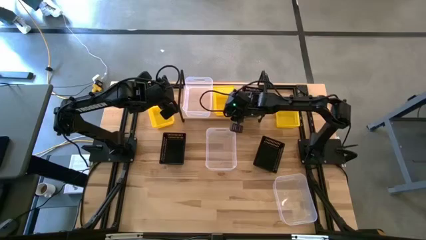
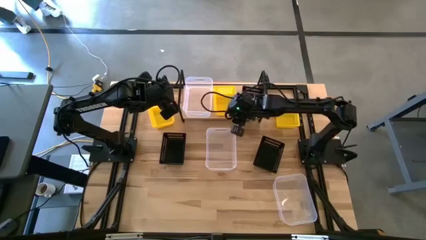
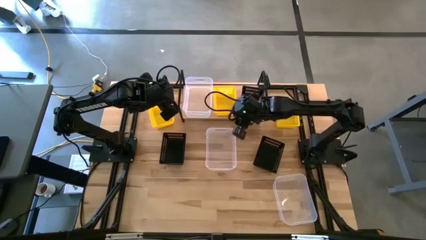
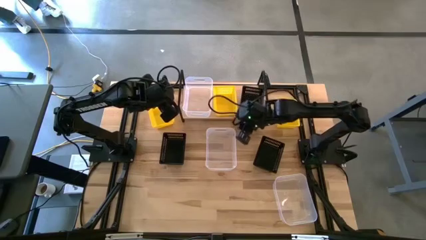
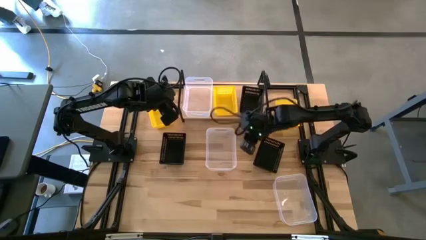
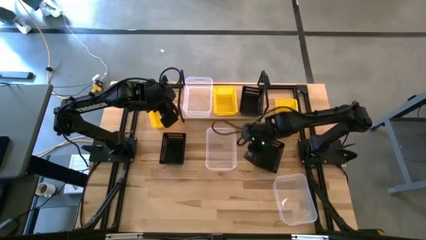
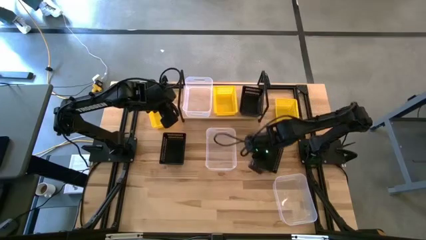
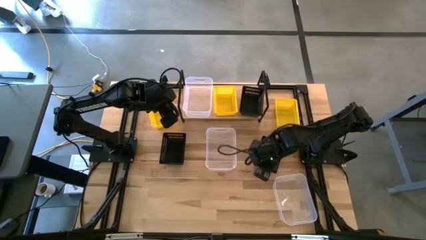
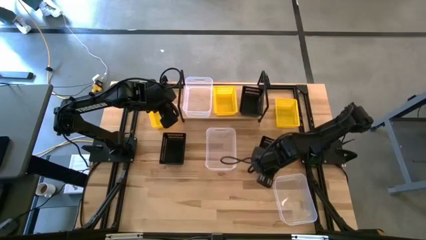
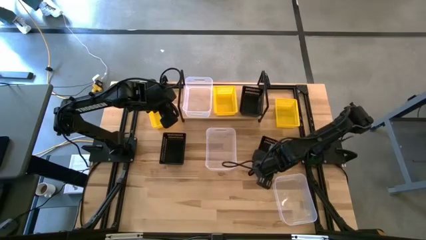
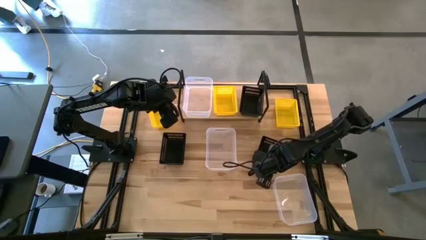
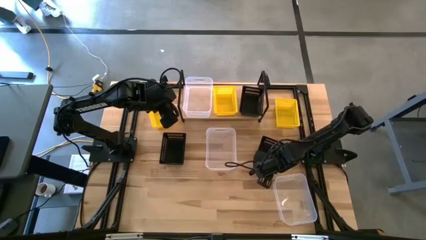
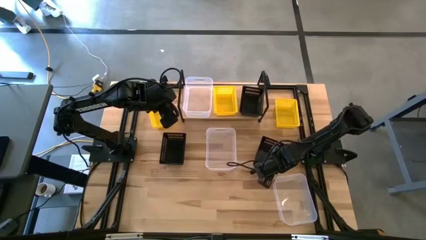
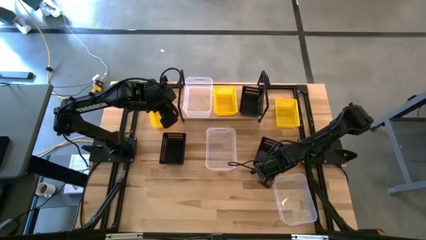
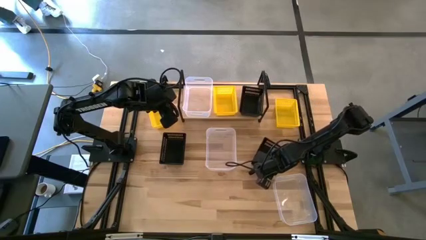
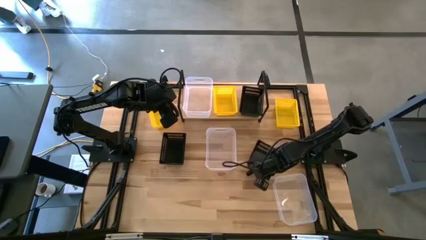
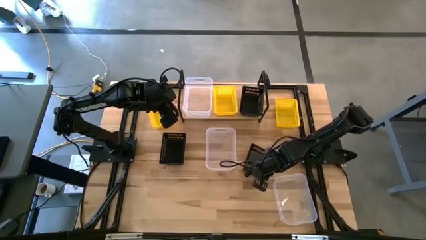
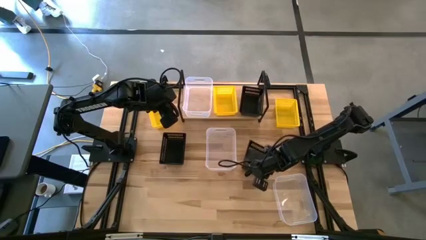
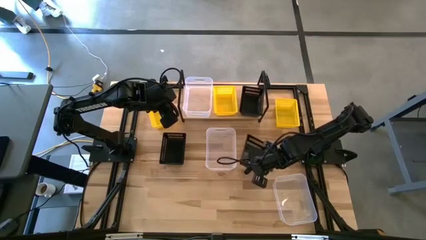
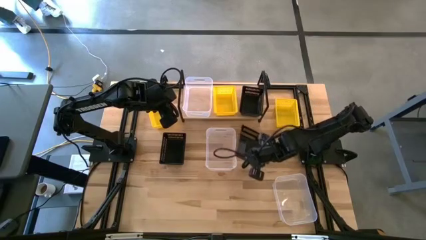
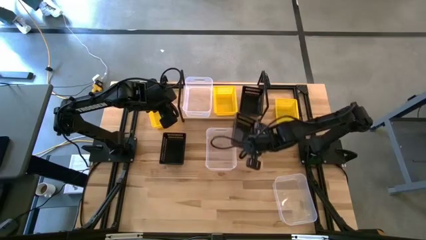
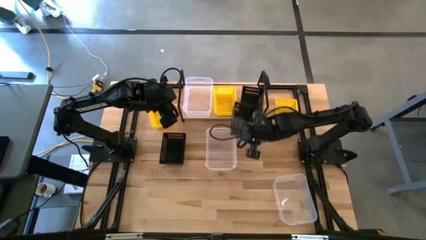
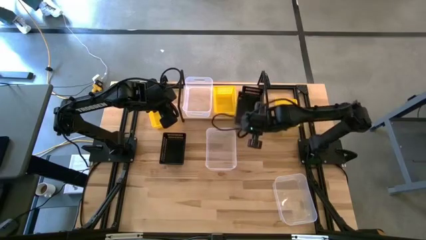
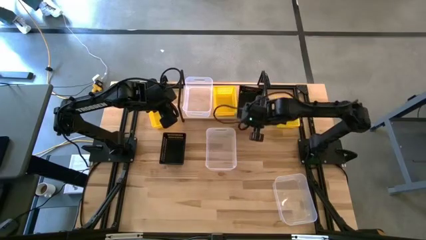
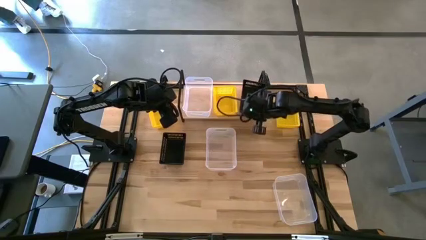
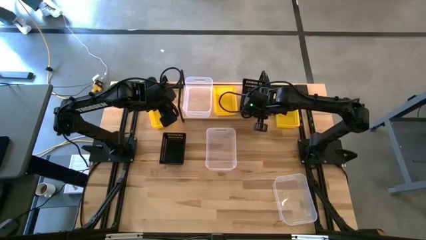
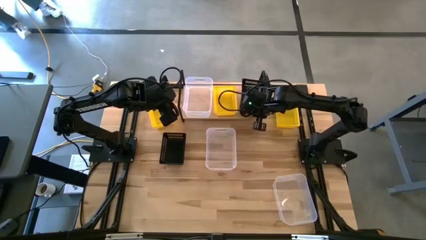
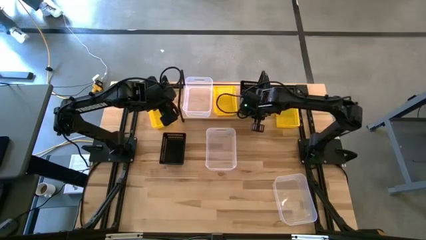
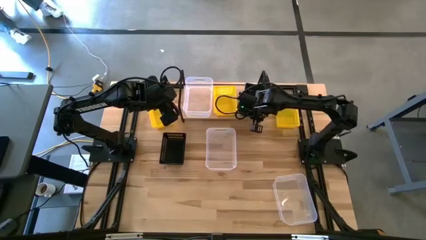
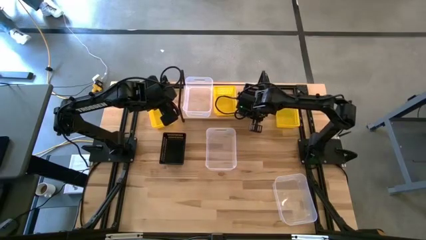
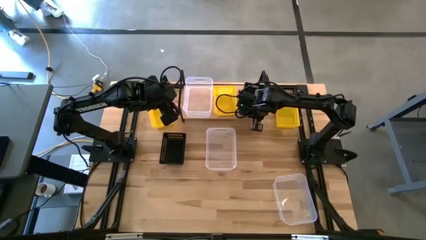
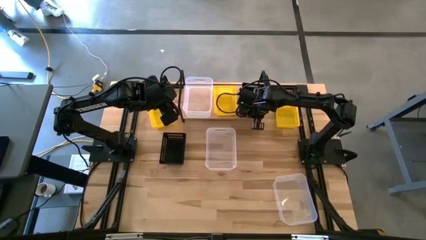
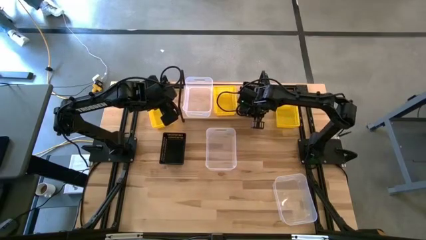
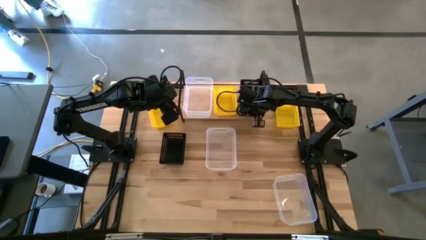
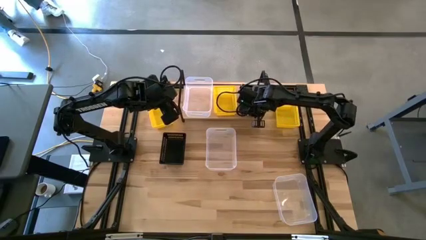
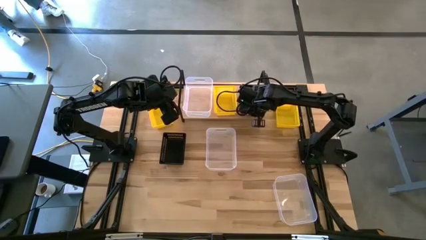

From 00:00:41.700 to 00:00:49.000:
Task: Stack baskets on shelf by color
Stack the right black bin on the black bin on the shelf
